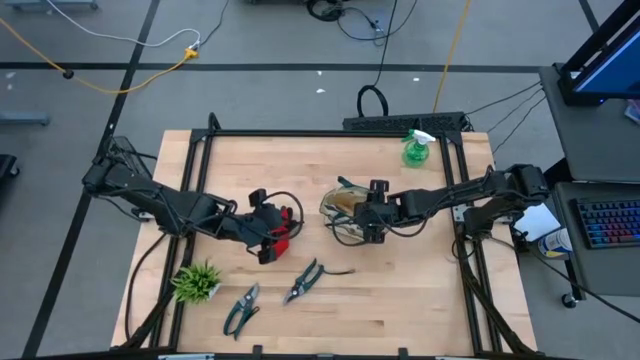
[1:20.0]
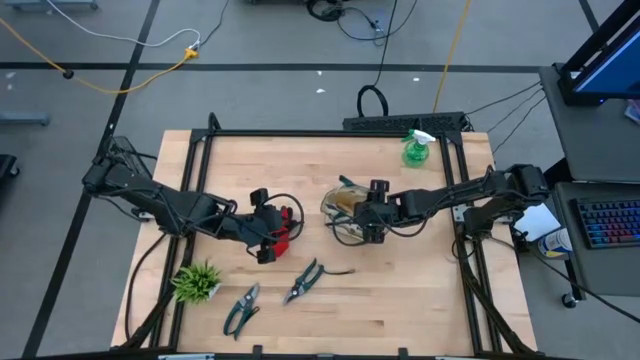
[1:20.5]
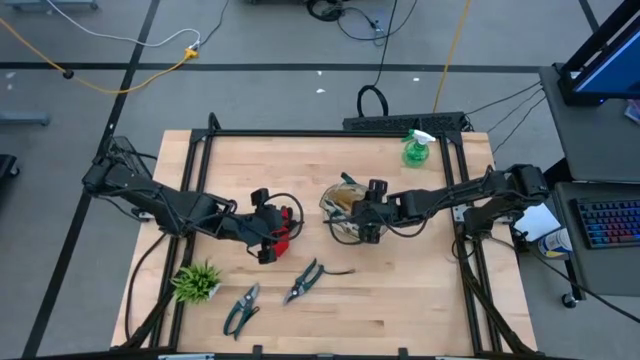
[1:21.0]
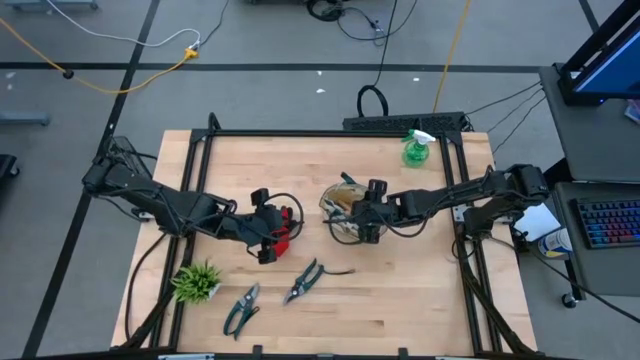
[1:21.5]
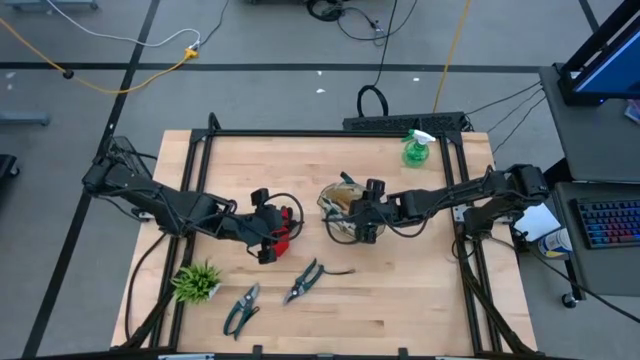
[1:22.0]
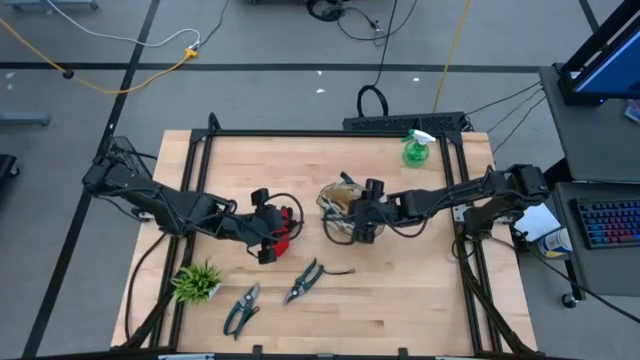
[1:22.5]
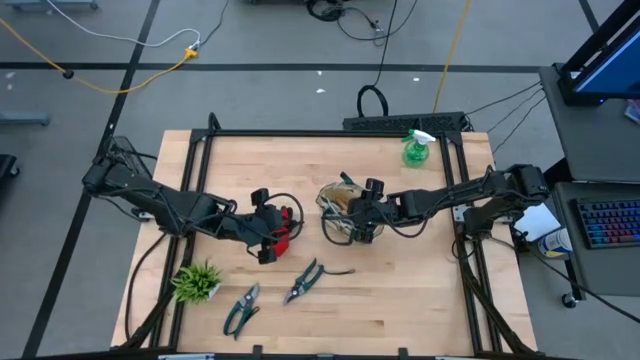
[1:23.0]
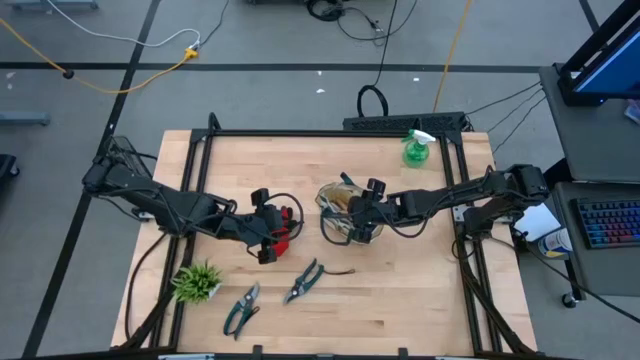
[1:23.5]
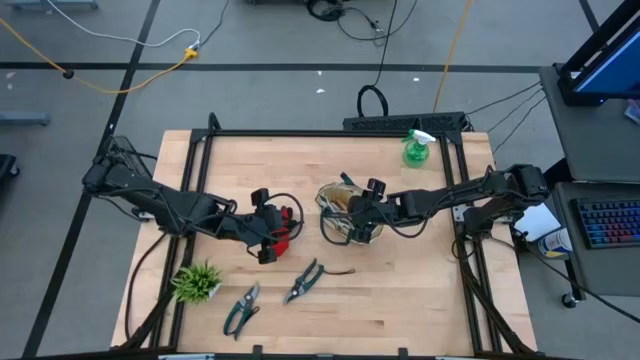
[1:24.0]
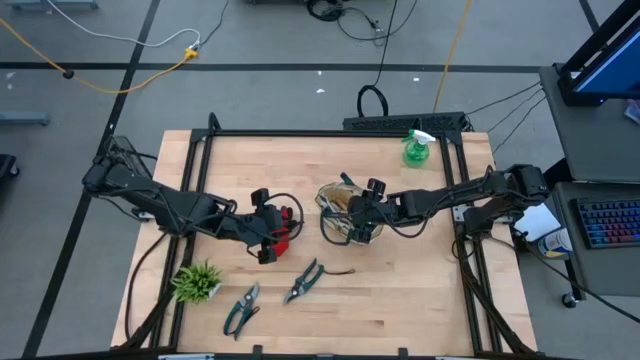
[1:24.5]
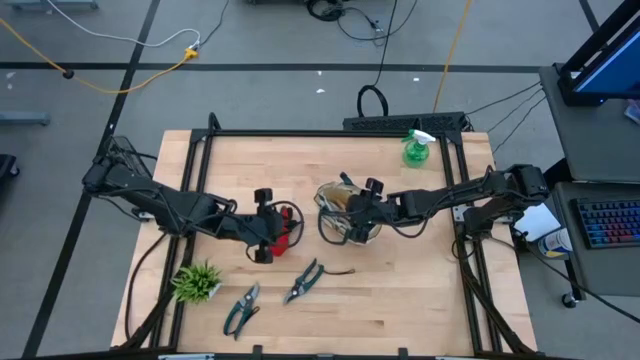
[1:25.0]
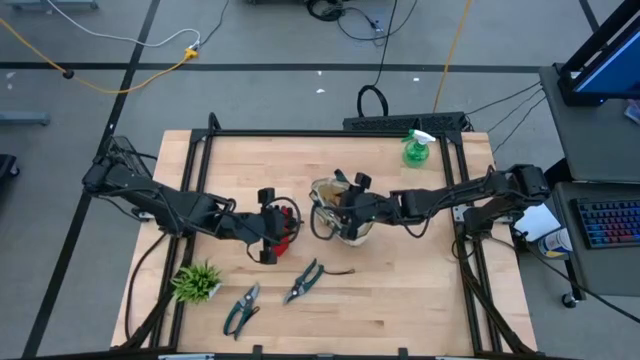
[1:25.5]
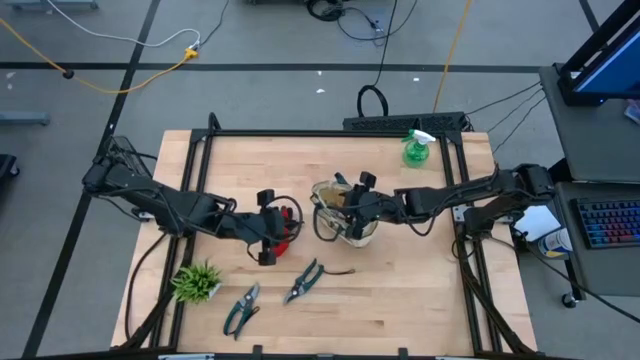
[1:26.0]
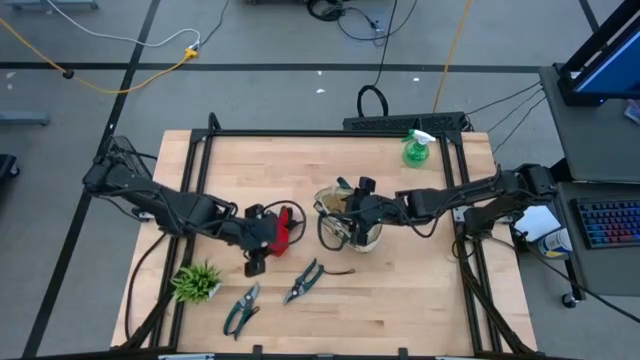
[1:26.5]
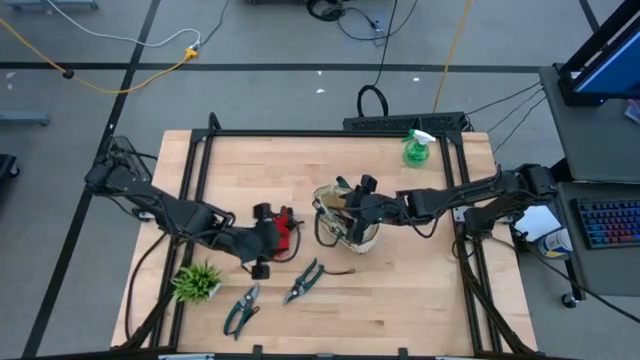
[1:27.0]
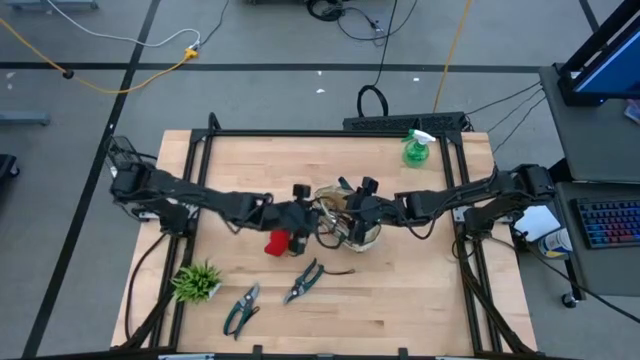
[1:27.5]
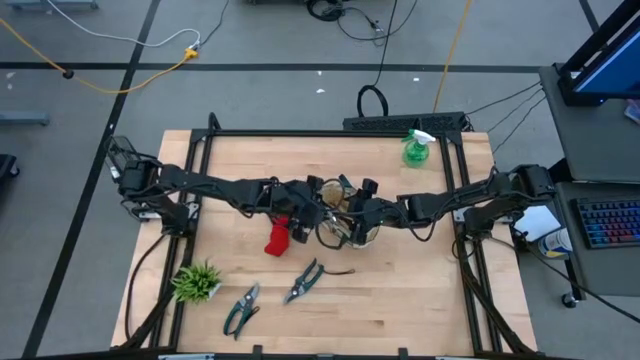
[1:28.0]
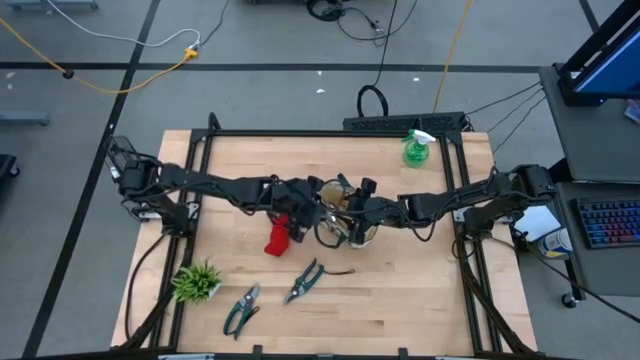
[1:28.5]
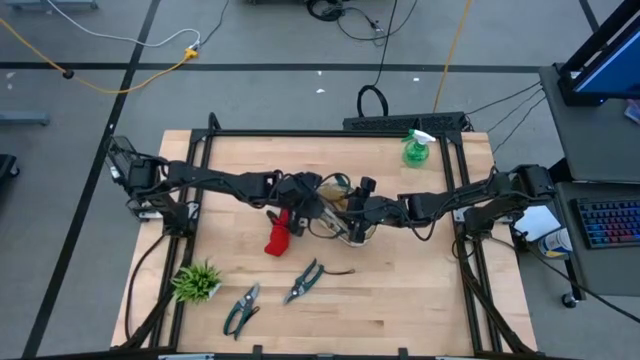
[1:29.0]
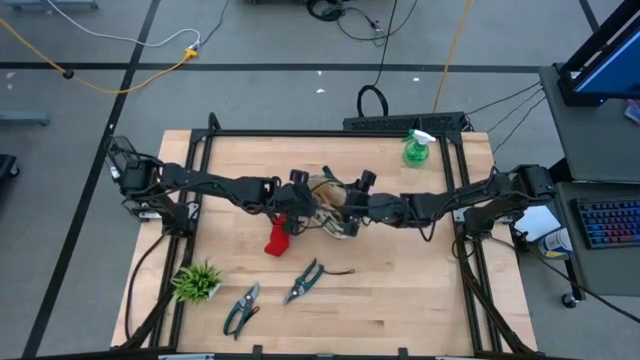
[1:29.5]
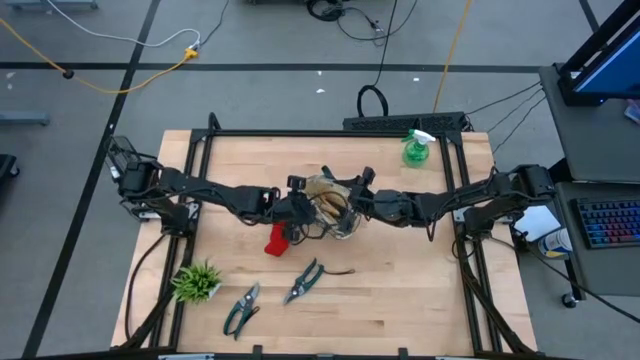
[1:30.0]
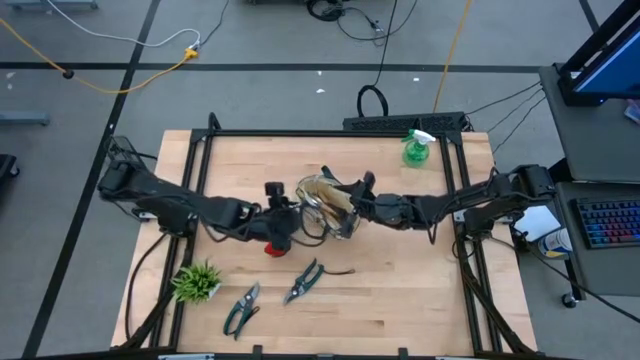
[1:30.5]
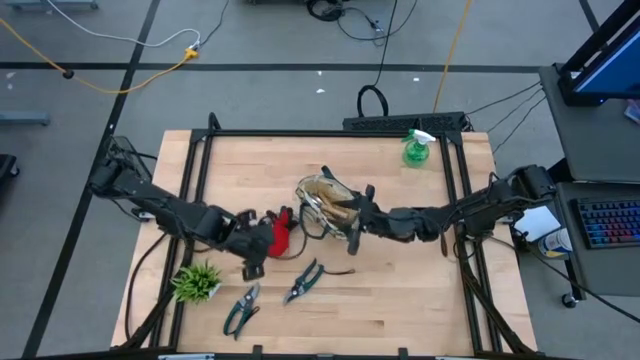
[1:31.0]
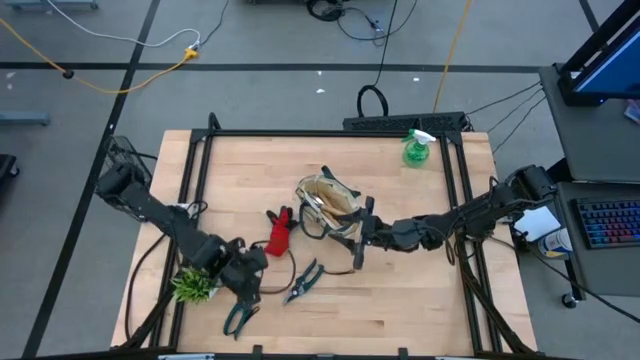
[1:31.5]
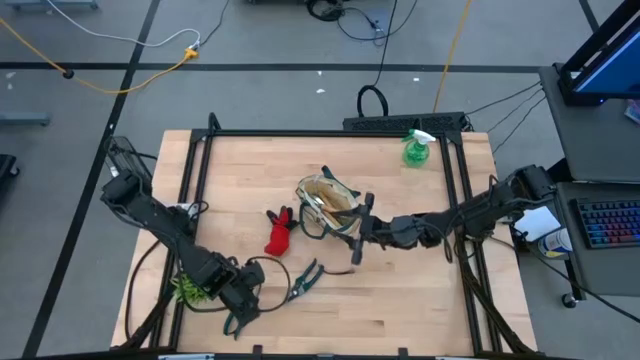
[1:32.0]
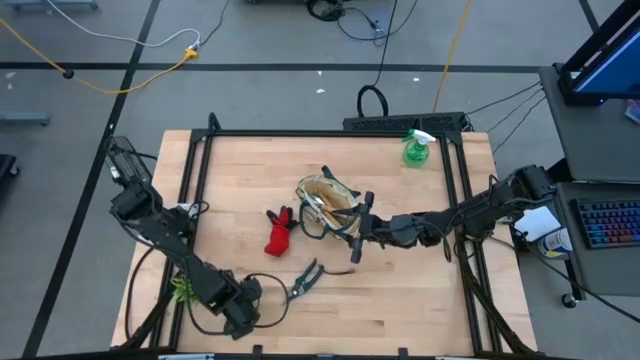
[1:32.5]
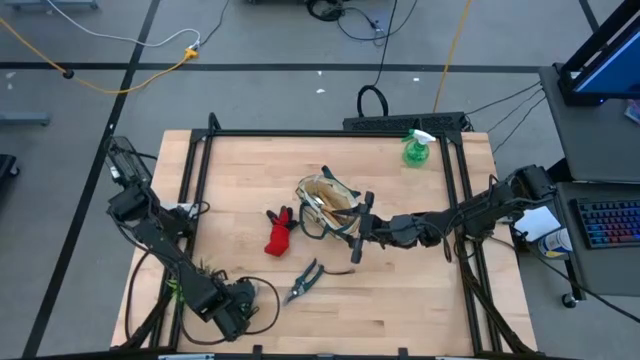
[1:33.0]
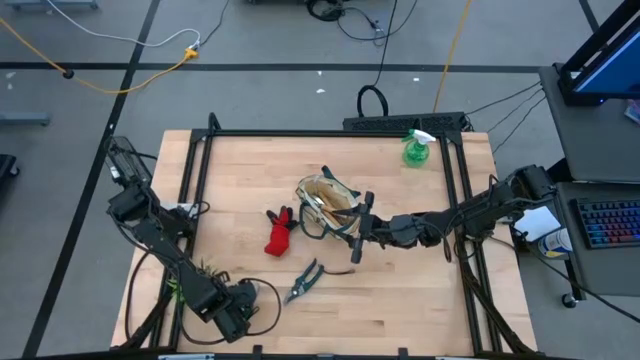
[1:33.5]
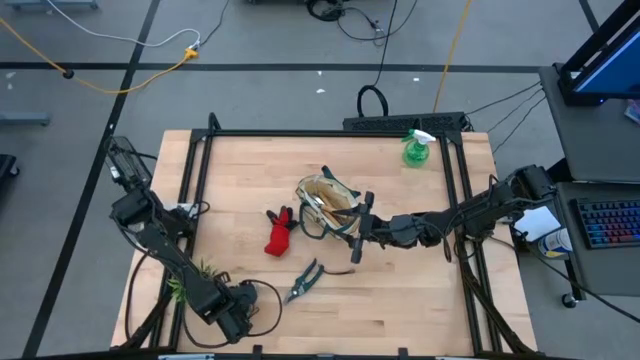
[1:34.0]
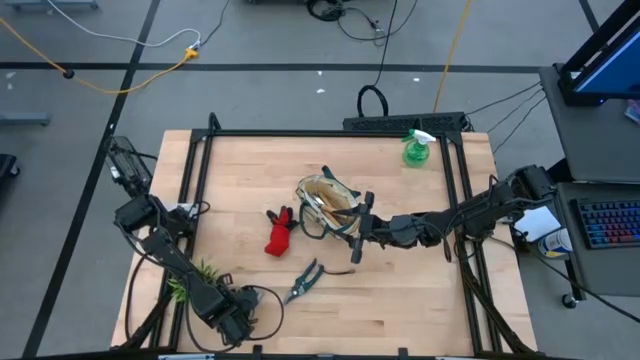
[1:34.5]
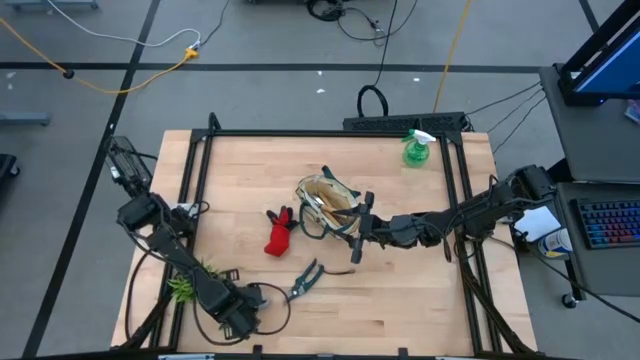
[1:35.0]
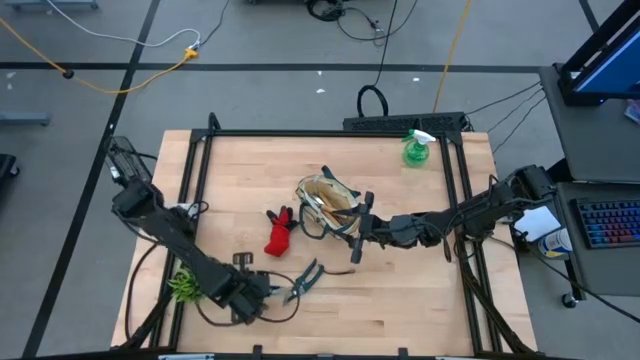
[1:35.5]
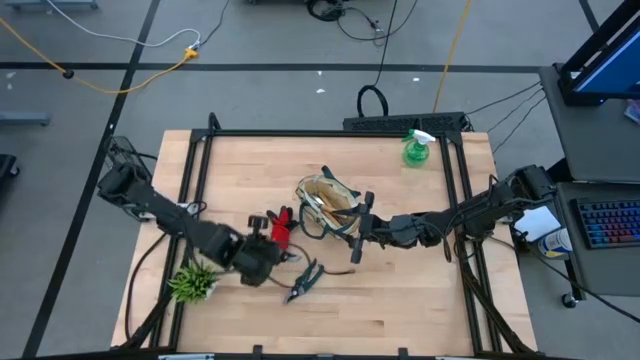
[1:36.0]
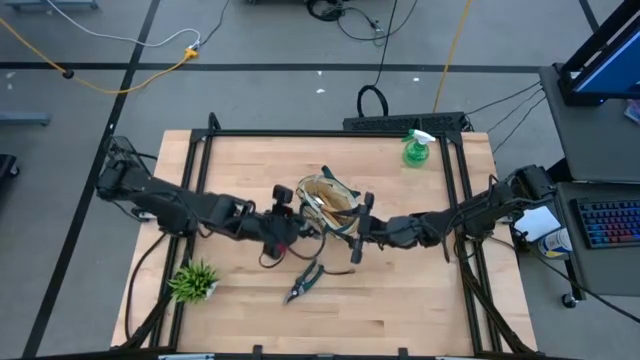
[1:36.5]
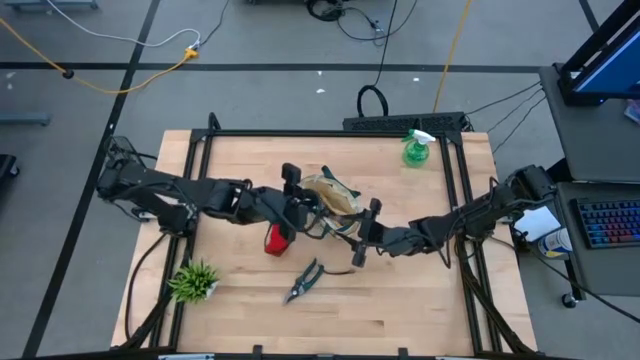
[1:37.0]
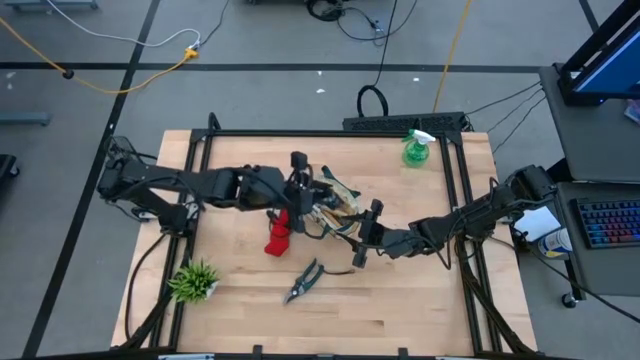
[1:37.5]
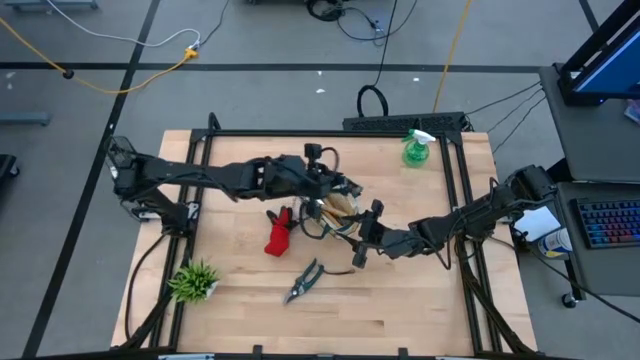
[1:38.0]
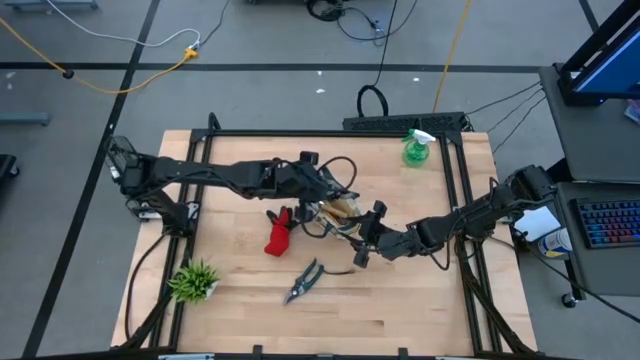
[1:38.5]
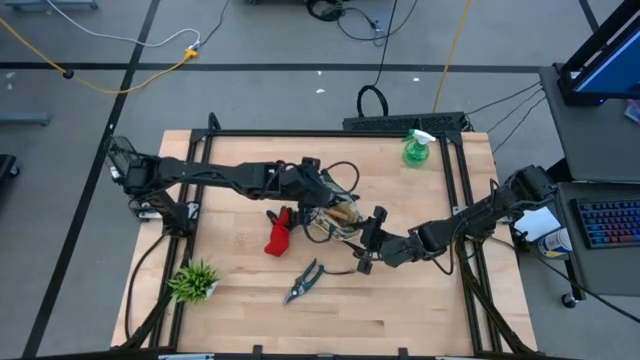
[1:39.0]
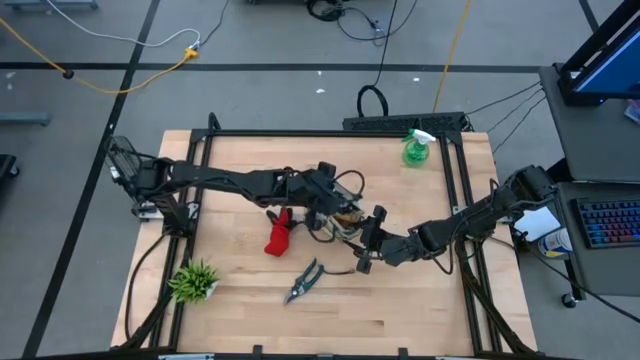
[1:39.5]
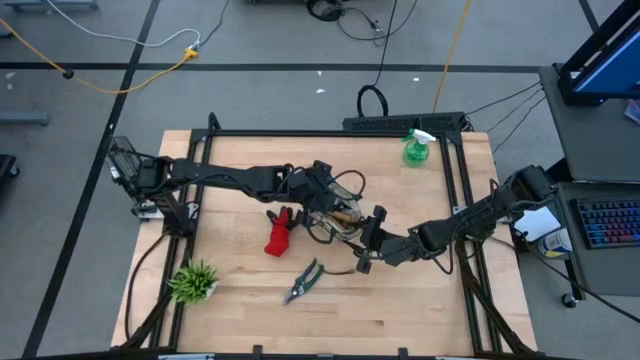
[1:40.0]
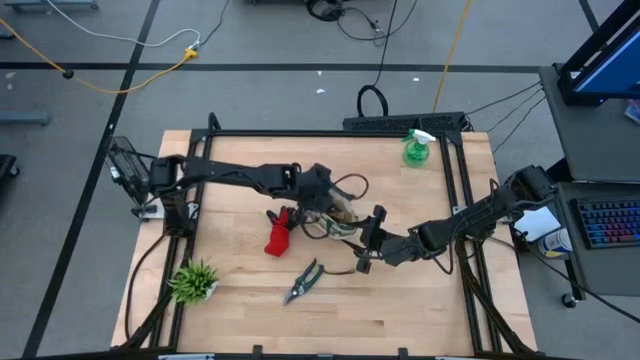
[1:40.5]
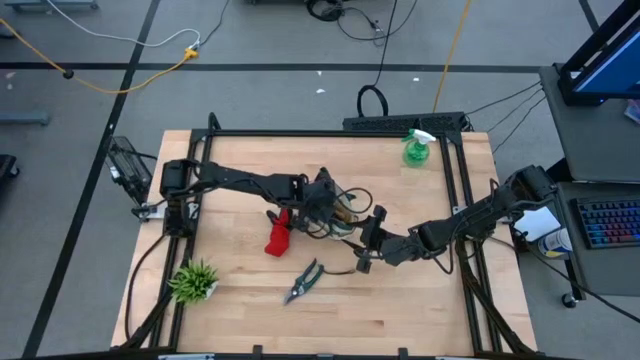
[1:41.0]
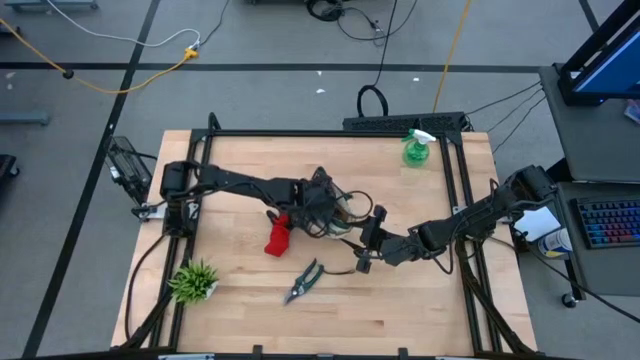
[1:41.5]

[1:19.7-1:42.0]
Task: Pick & Place Garden tools in Gardening bag
Put the left green shear scissors into the gardening bag
